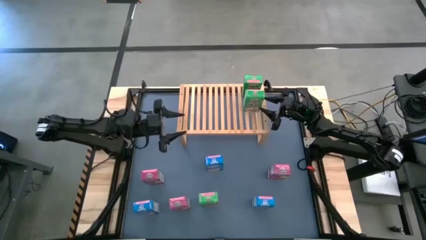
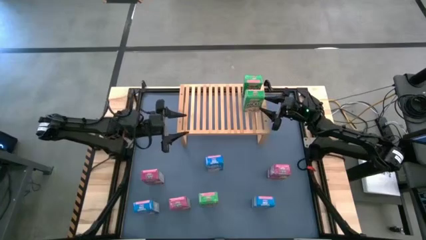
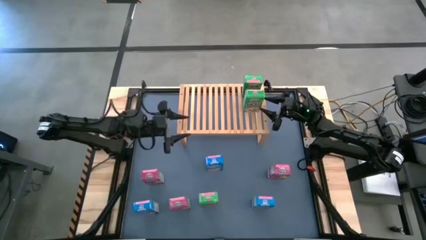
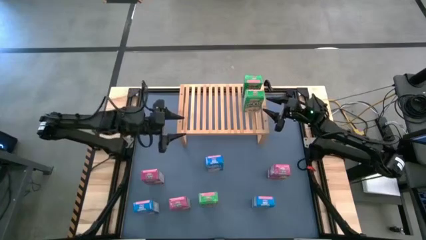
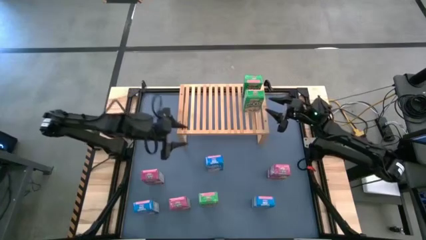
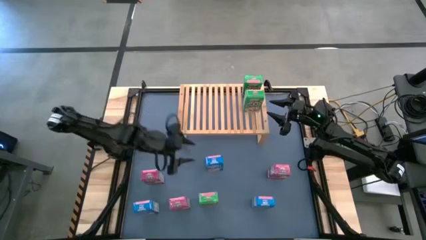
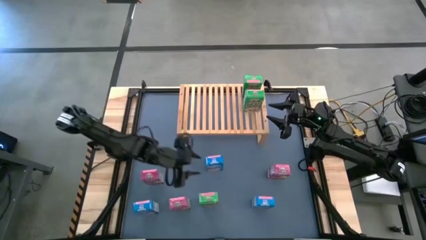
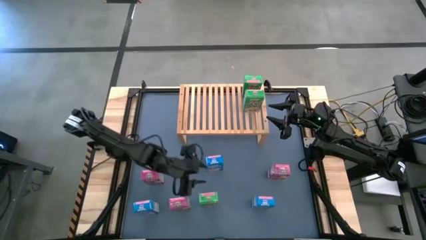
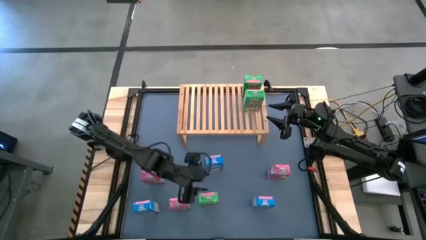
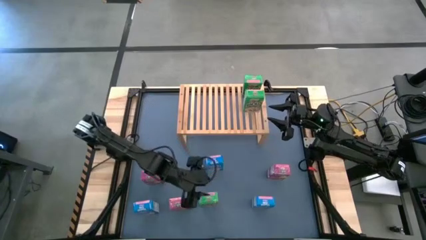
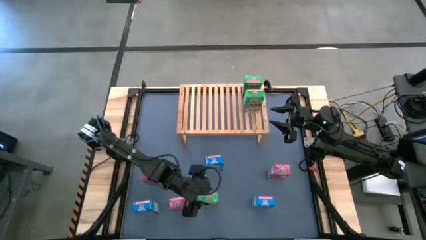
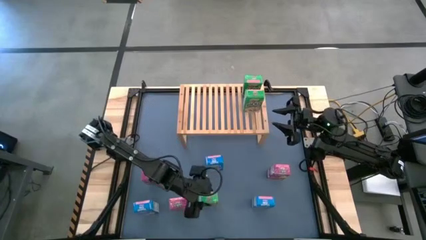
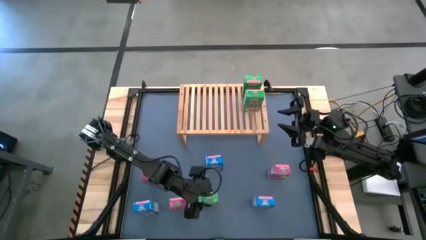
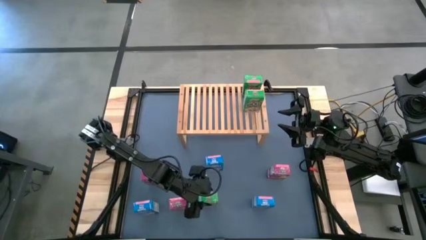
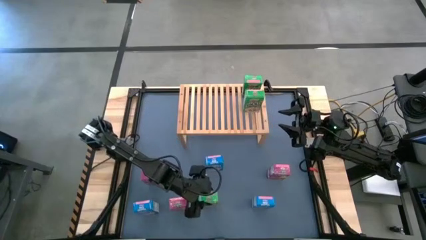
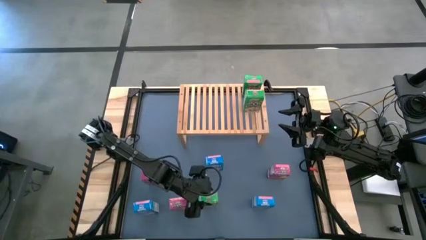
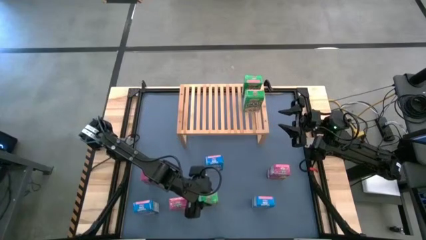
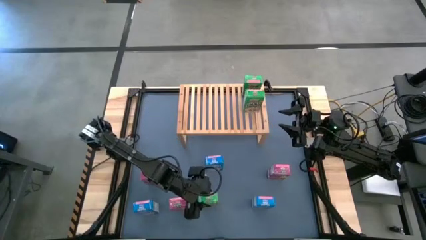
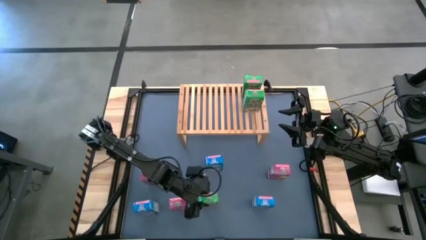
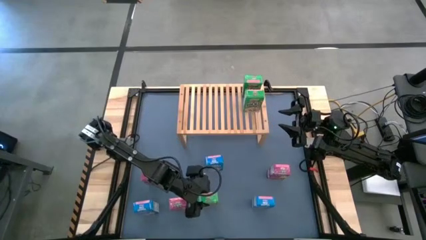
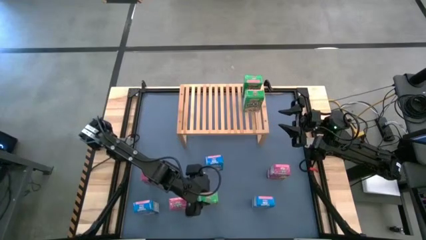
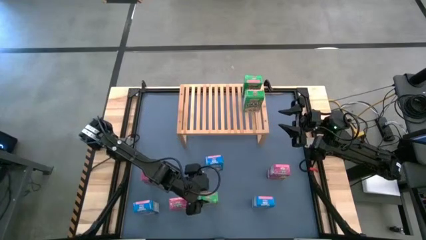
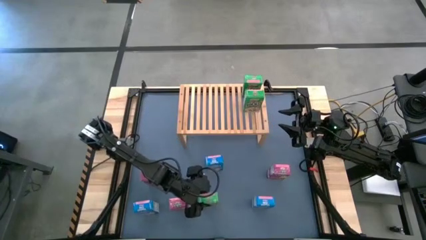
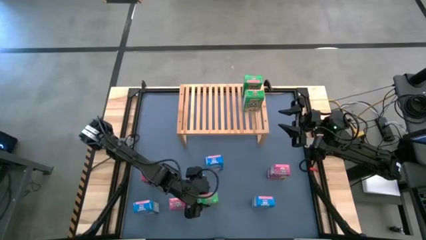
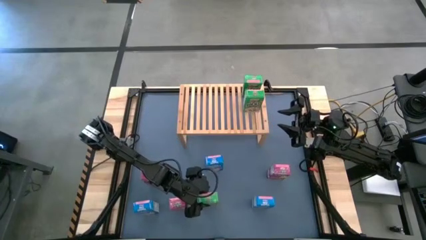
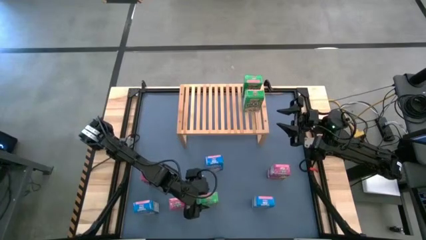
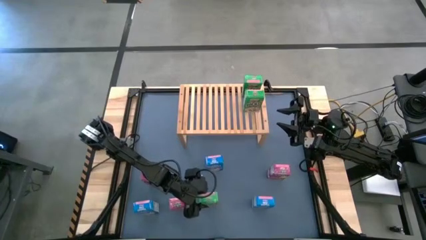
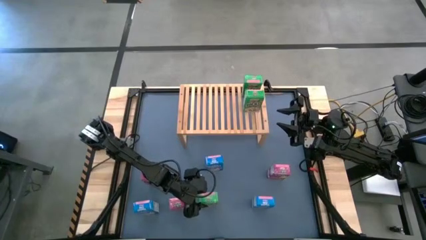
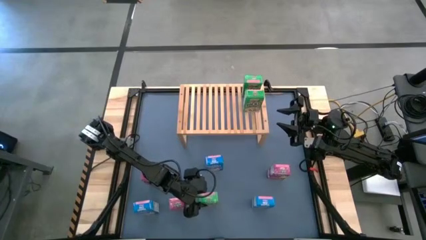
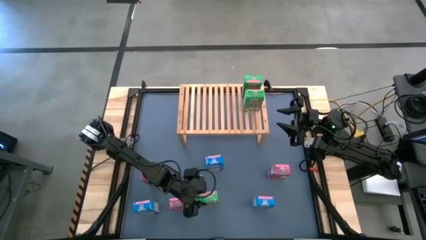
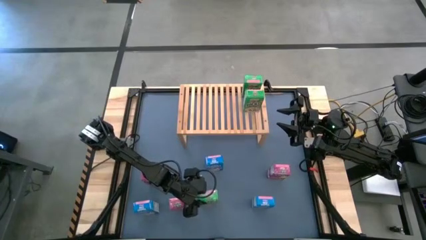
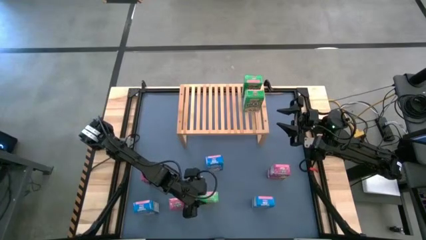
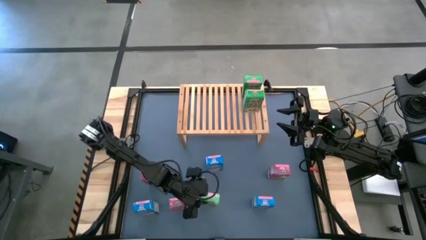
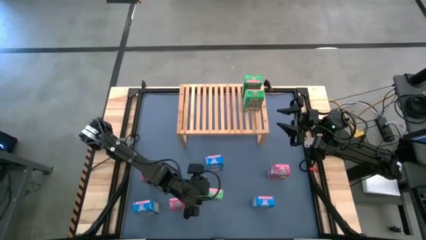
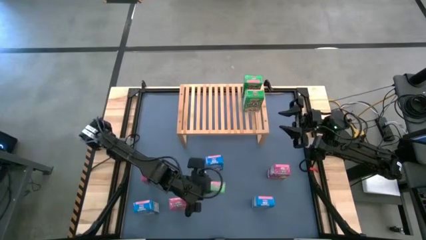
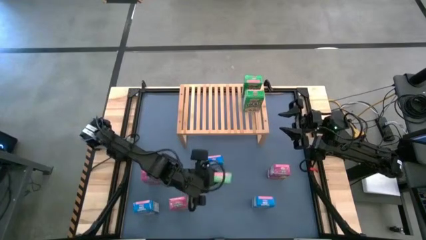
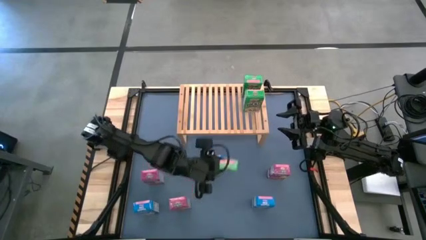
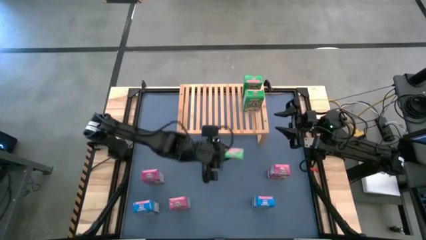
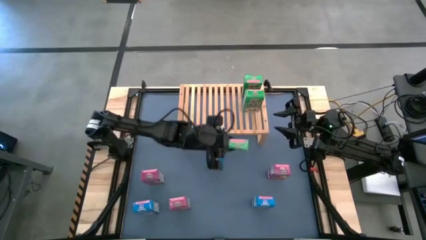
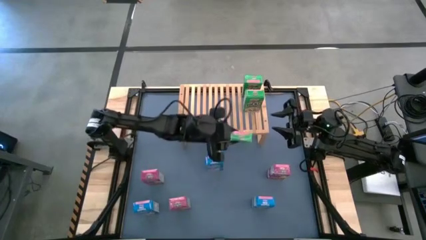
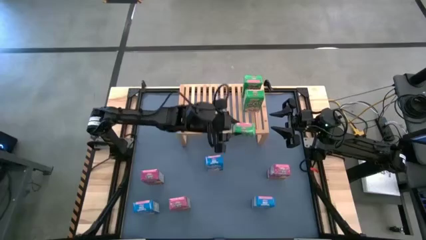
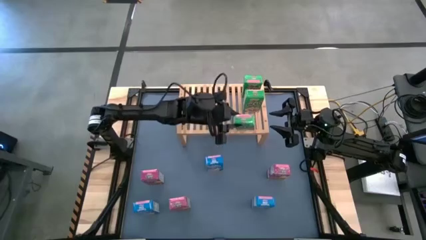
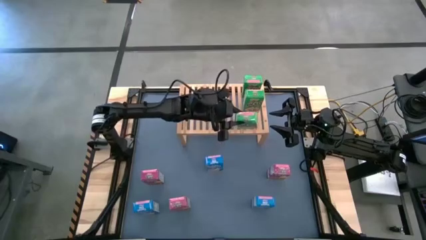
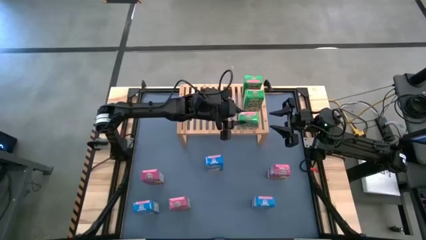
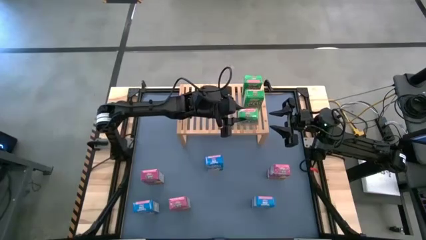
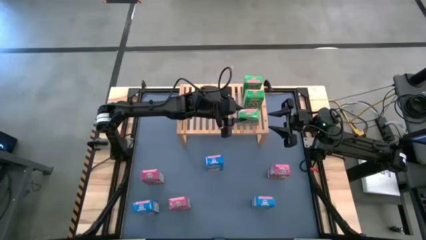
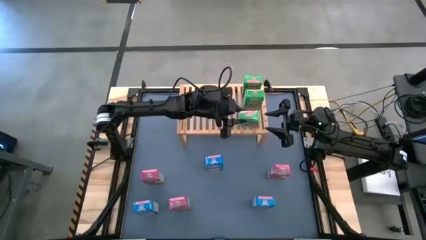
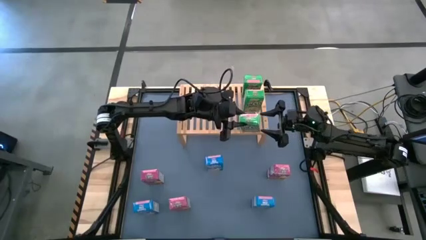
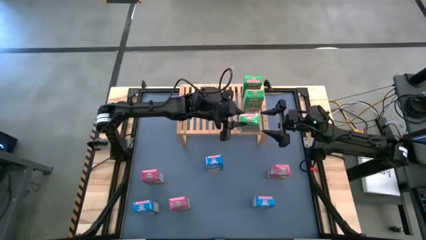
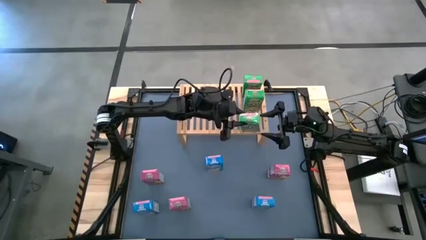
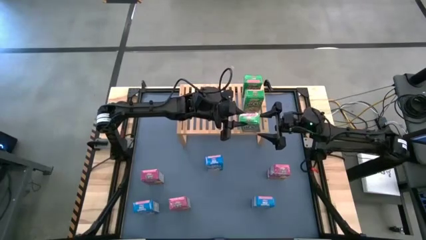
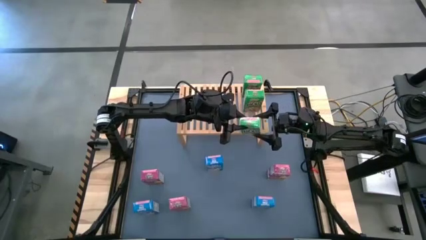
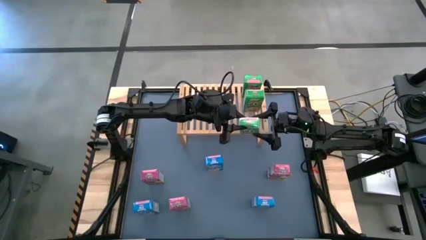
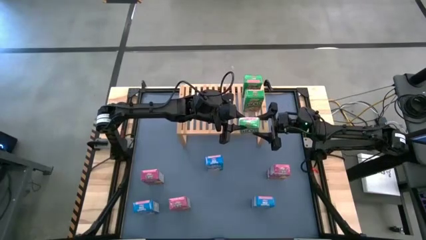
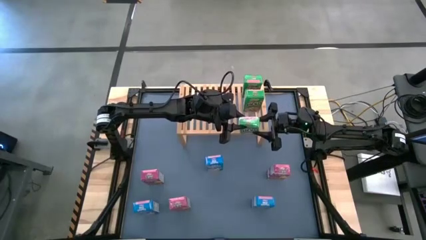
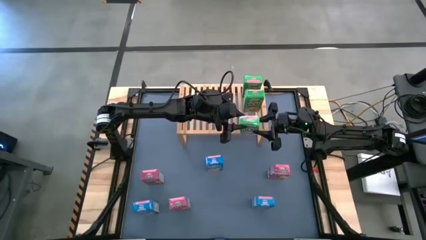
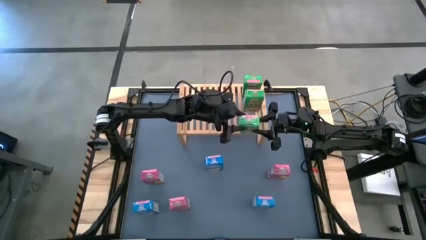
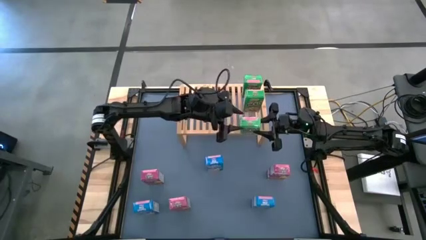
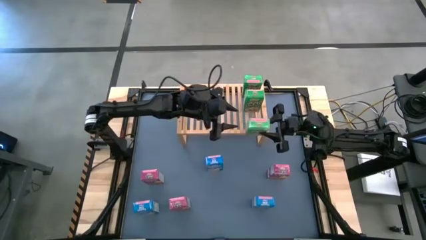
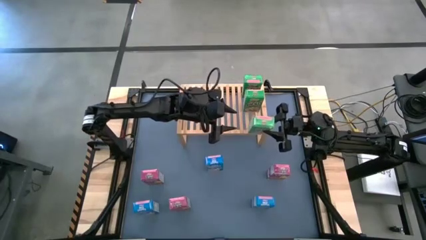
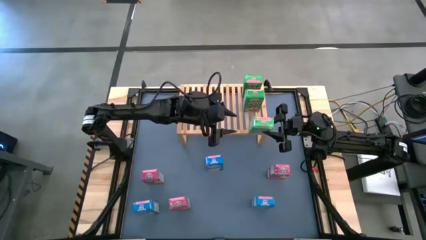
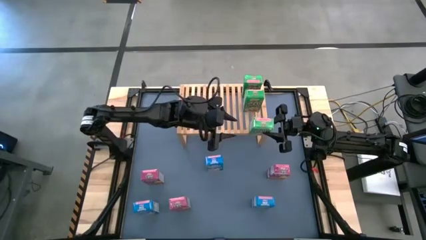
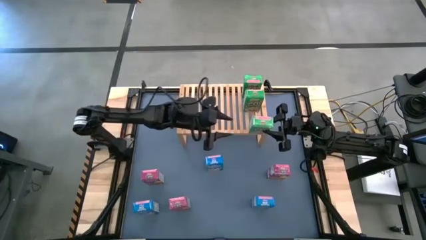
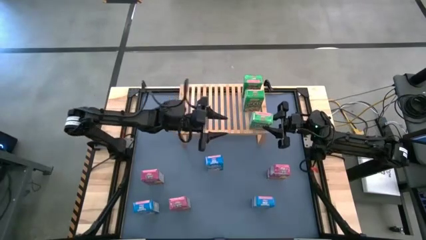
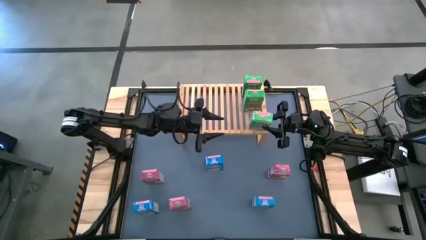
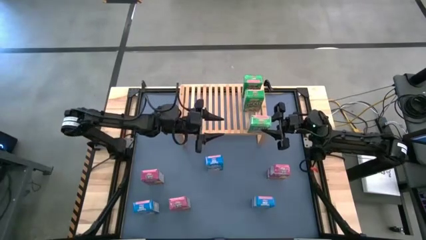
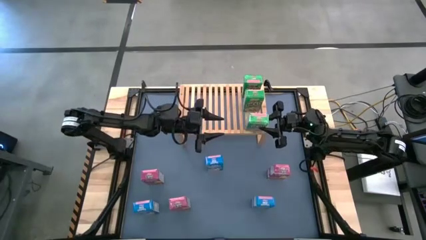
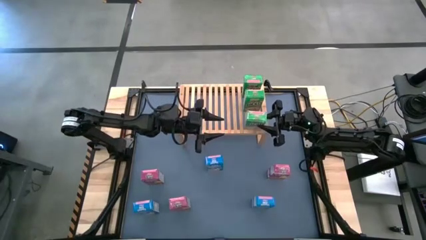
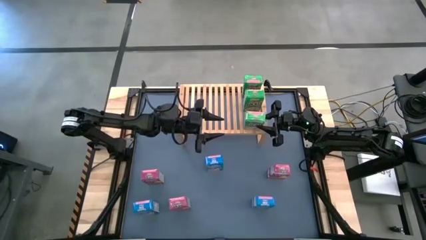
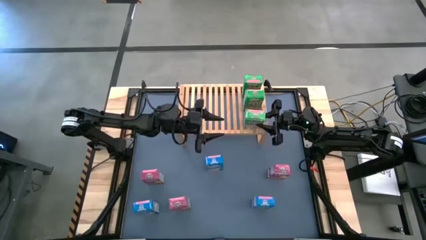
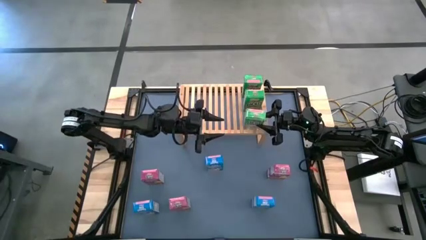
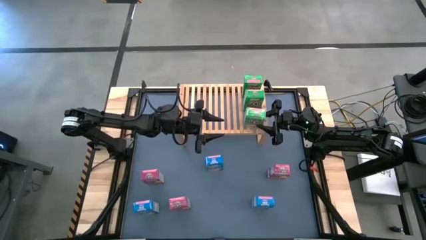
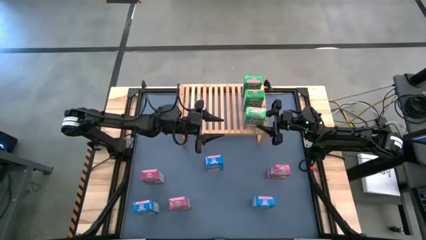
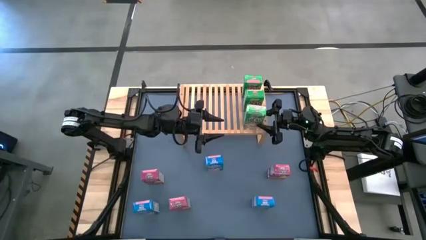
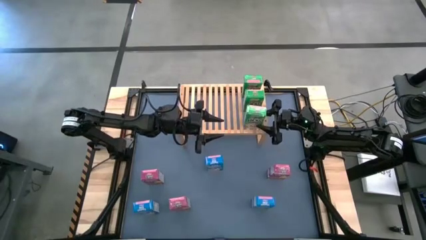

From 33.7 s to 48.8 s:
Task: Stack cereal on shelf
Put the green cereal box on the shelf aligned with the other cereal boxes
